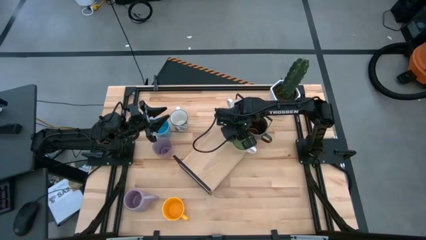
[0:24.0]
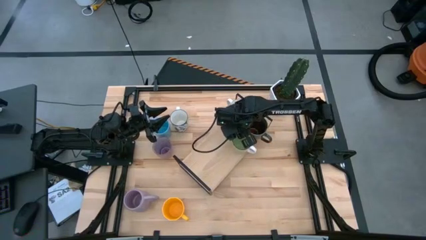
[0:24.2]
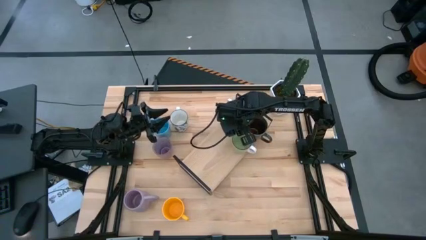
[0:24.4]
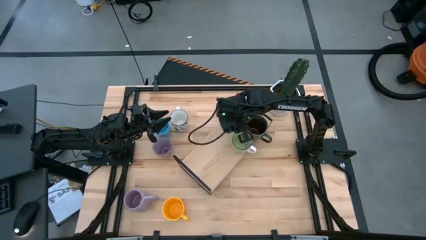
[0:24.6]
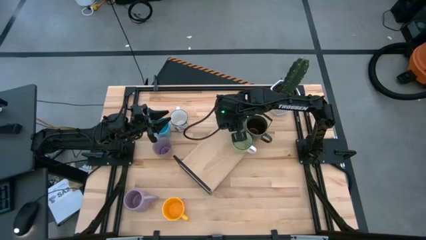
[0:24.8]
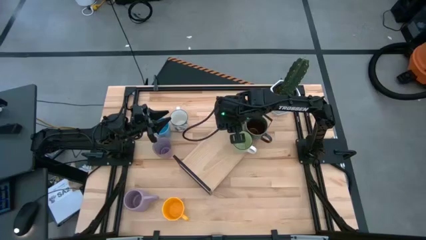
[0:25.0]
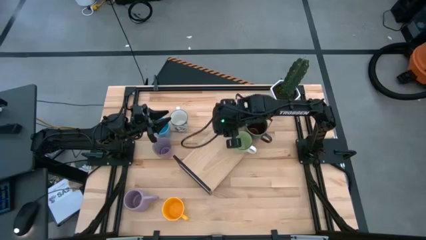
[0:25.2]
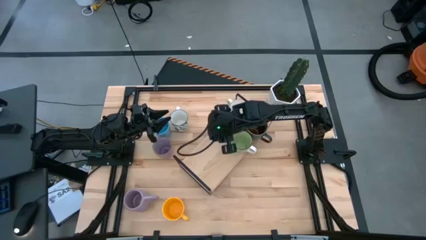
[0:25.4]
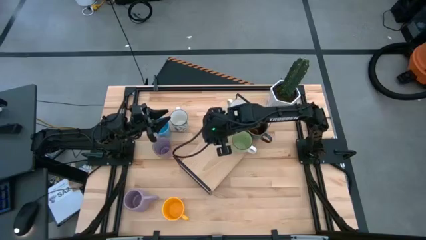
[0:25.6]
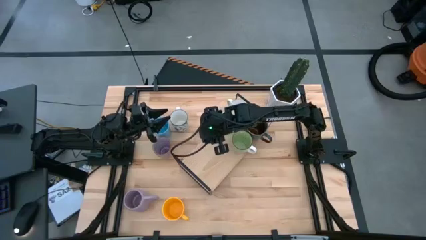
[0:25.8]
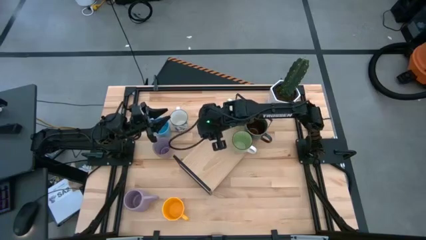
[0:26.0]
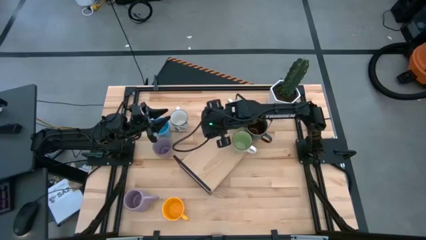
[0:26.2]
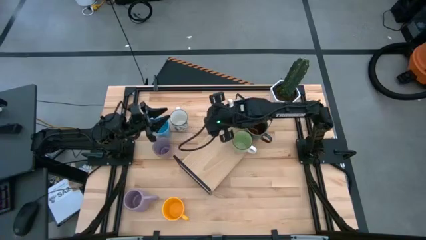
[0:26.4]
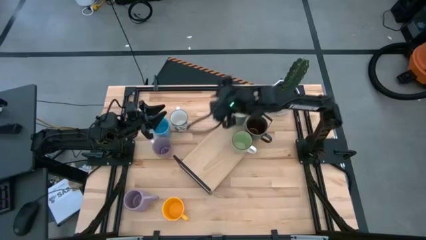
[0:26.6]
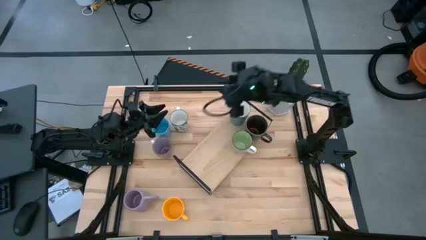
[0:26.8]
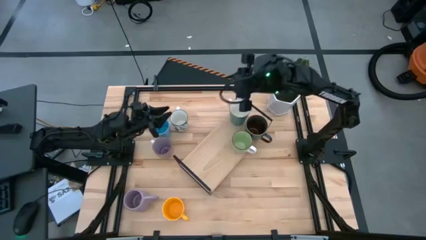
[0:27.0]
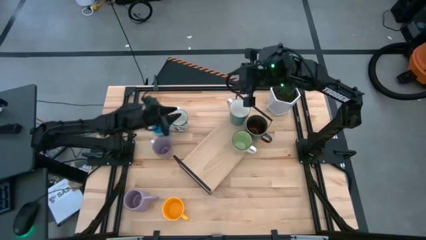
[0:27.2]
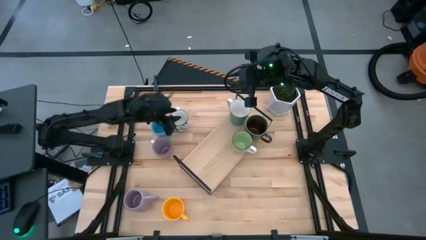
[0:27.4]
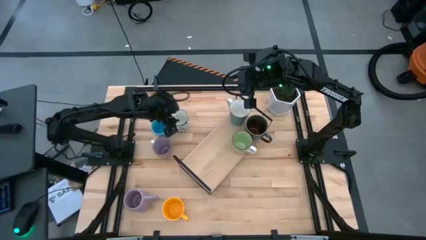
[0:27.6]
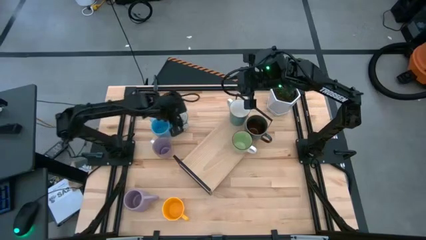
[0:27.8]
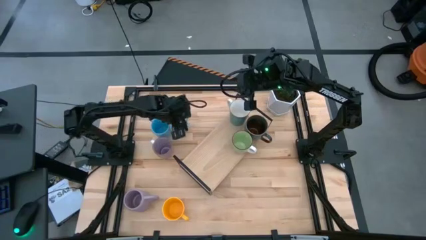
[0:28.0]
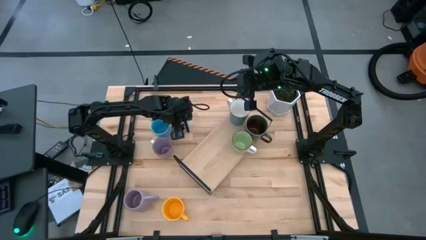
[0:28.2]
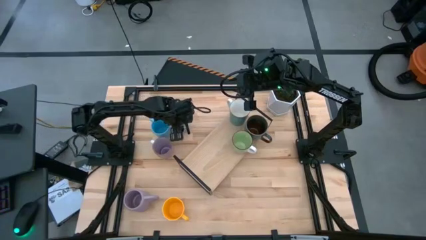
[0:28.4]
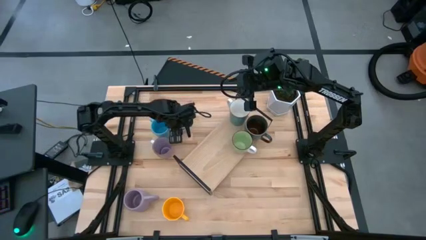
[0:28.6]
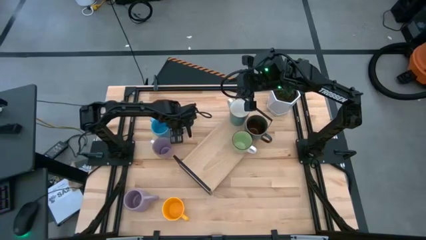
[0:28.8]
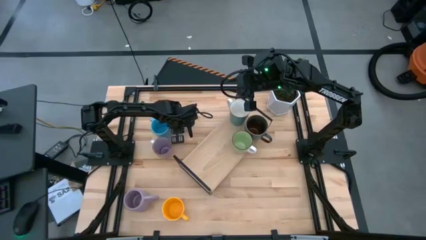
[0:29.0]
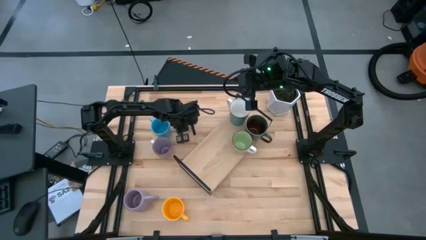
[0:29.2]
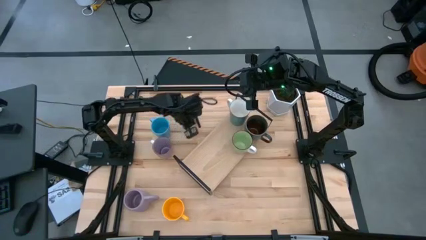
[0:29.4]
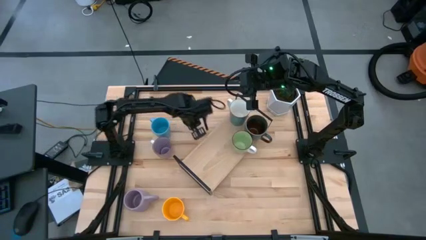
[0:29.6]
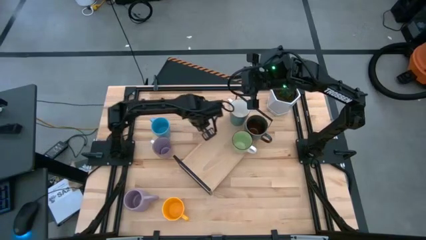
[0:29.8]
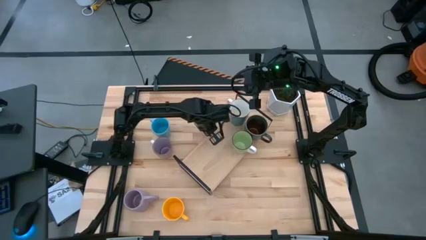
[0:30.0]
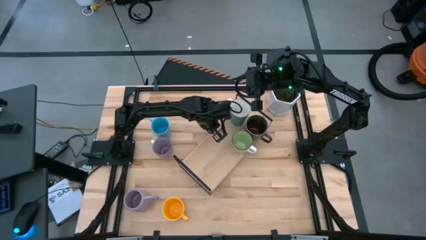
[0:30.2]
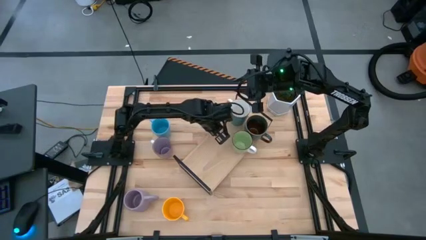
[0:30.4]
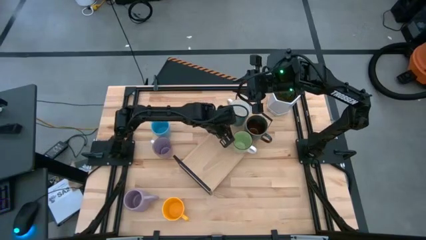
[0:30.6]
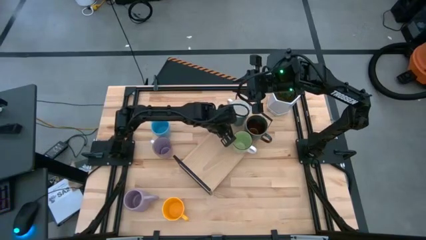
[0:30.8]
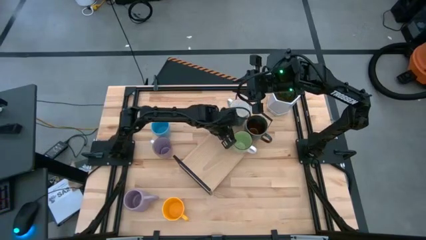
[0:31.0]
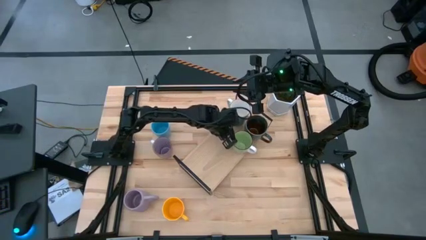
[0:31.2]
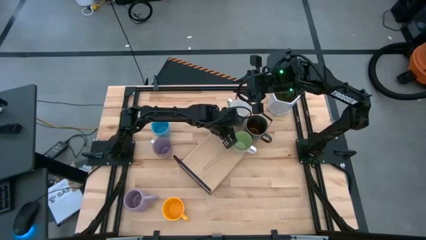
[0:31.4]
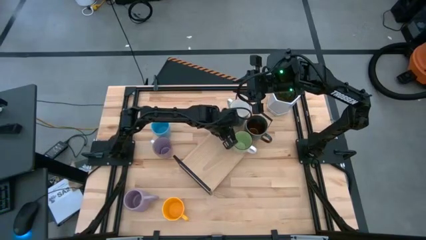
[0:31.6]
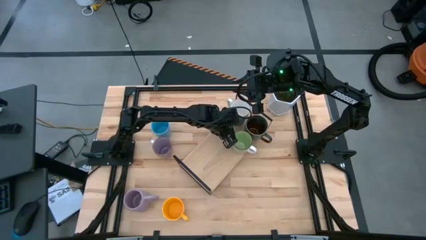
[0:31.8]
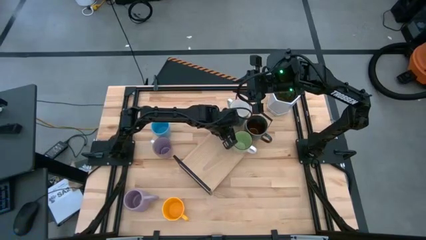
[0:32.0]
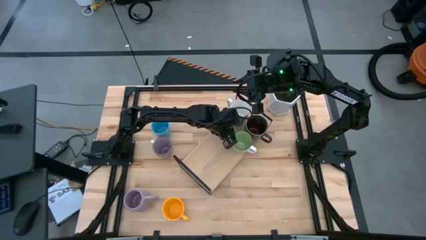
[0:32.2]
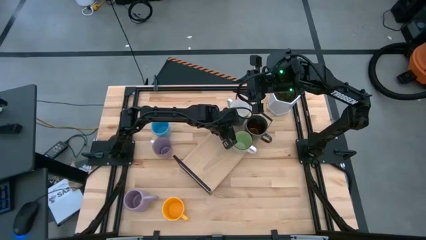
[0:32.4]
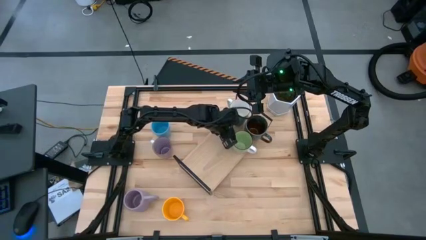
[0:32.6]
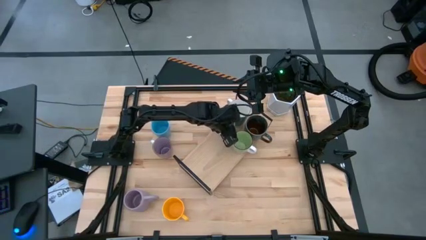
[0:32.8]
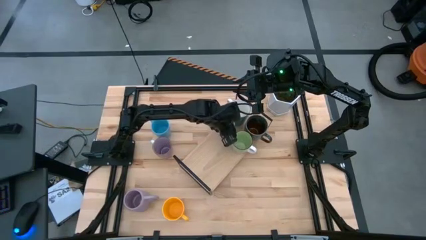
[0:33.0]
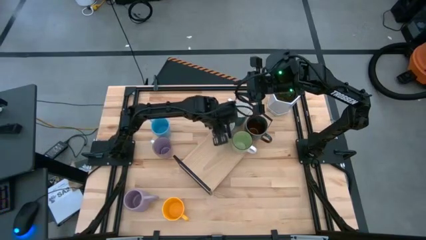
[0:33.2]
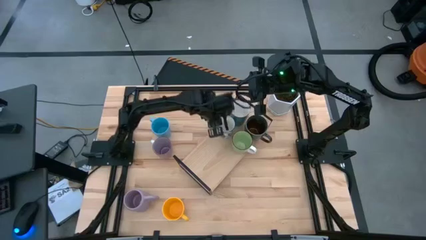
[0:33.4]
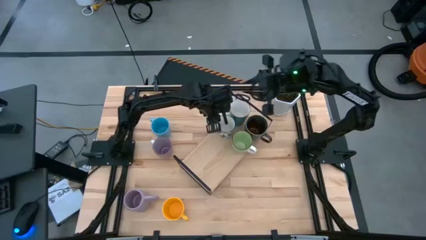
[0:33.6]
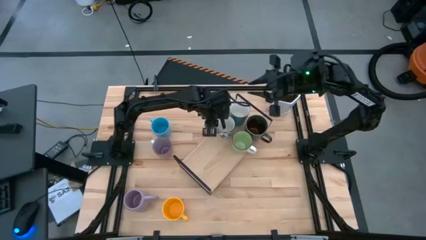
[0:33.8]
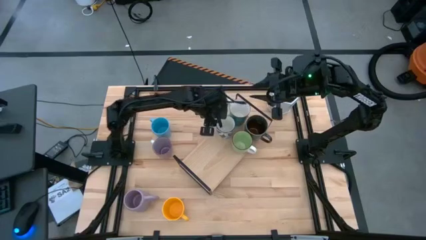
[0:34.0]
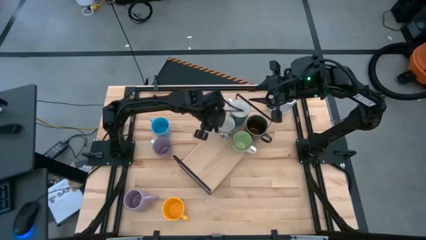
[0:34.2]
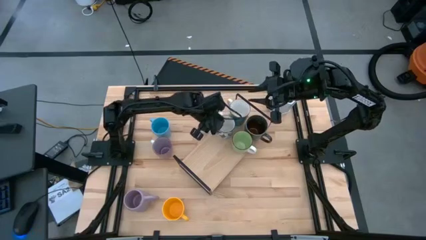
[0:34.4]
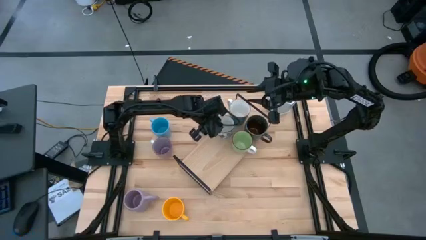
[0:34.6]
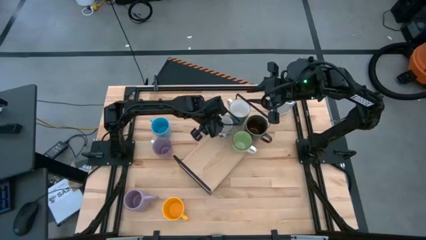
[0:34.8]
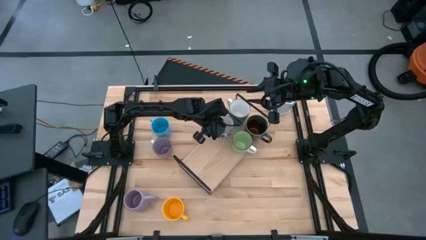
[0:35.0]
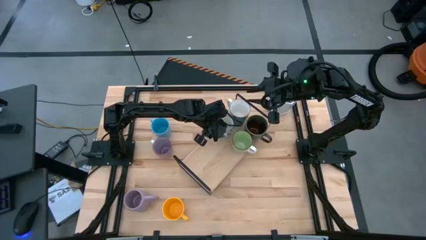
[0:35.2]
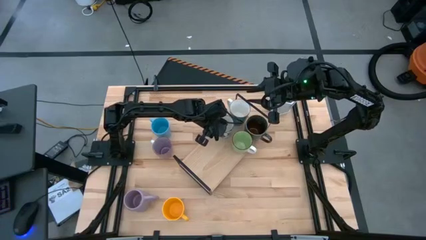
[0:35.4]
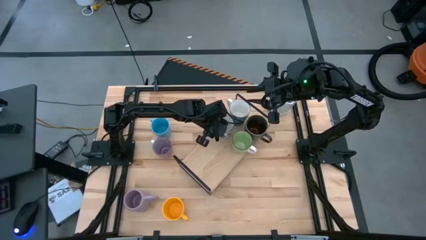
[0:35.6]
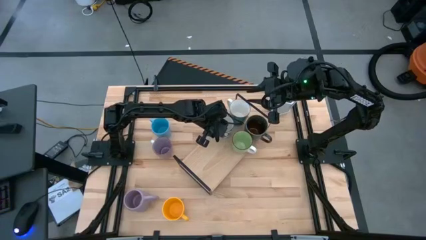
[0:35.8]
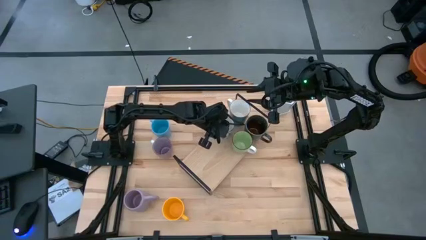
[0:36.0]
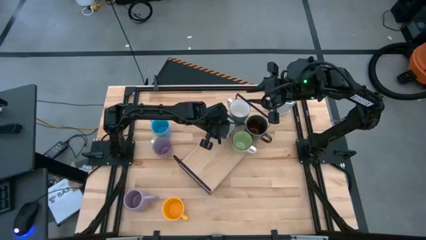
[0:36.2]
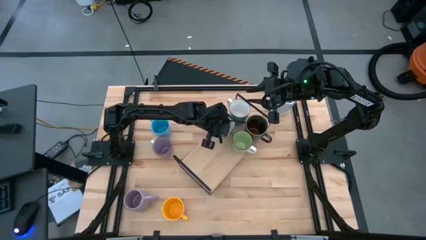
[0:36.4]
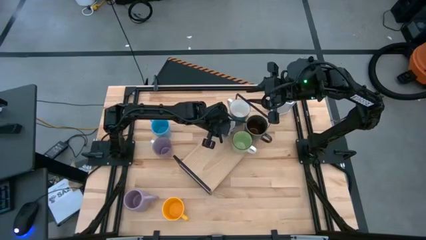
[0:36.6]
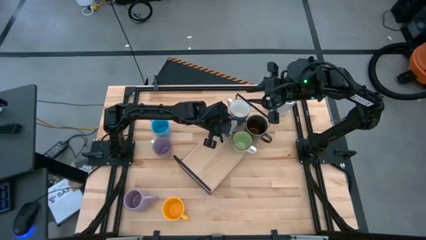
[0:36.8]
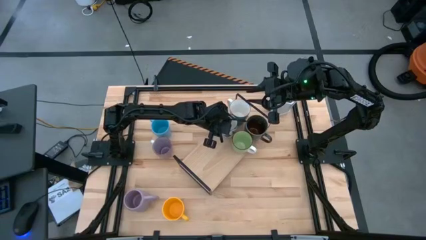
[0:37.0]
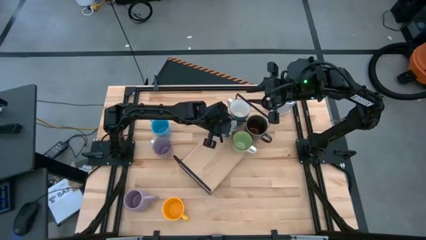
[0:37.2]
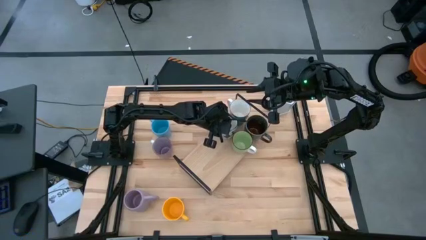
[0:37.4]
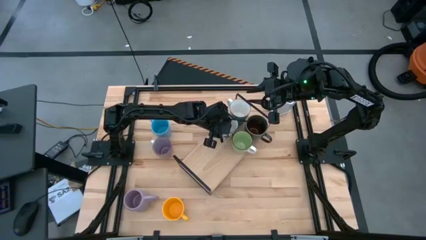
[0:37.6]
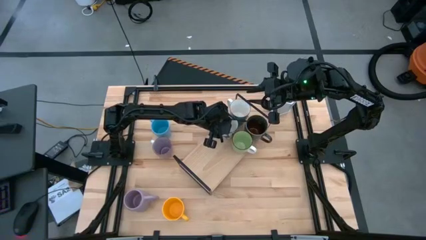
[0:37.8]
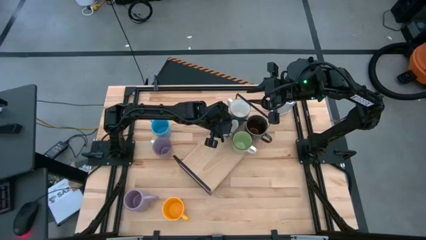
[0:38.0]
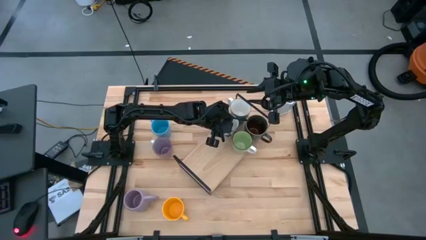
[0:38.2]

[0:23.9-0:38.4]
Task: Place coffee mugs
Put the white patterned mug on the shelf

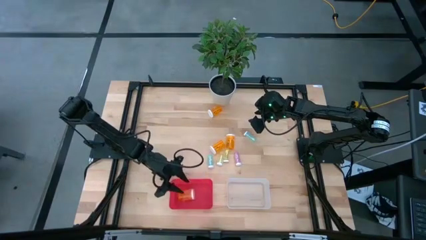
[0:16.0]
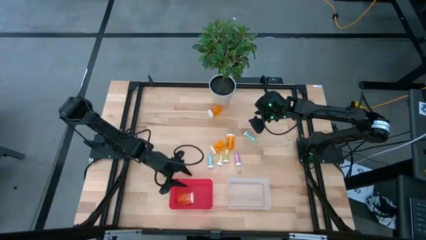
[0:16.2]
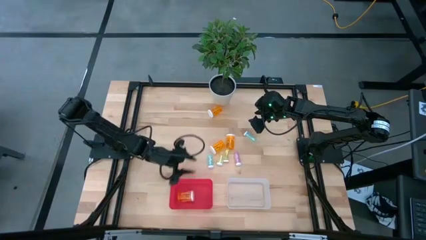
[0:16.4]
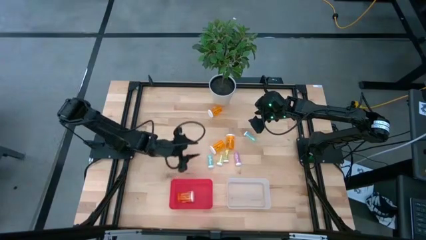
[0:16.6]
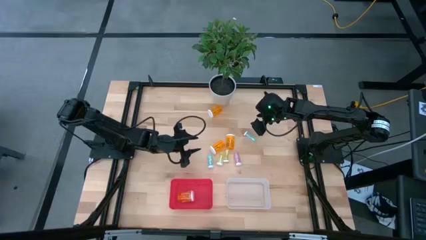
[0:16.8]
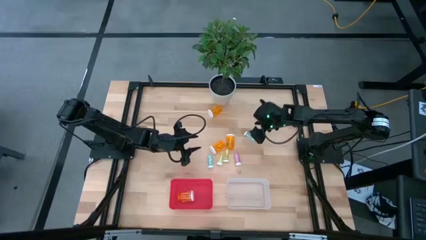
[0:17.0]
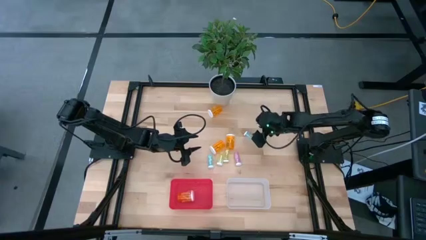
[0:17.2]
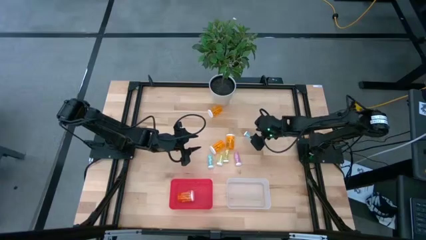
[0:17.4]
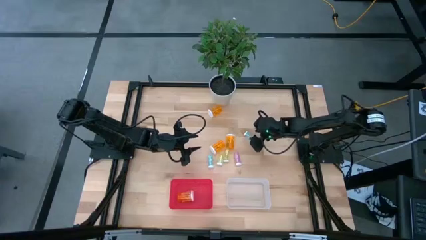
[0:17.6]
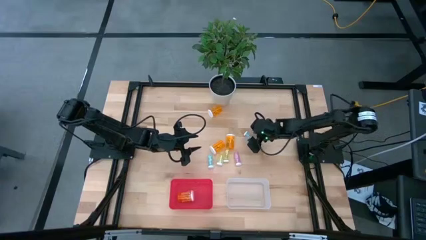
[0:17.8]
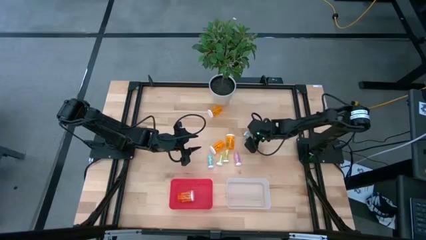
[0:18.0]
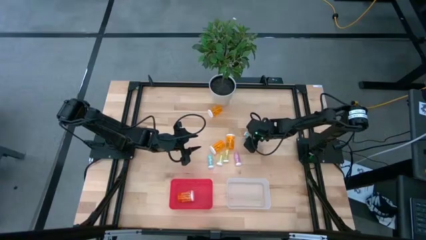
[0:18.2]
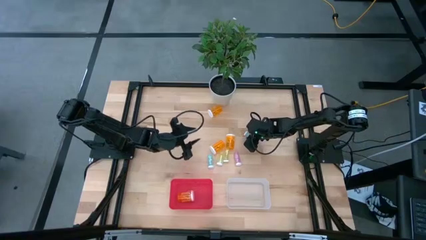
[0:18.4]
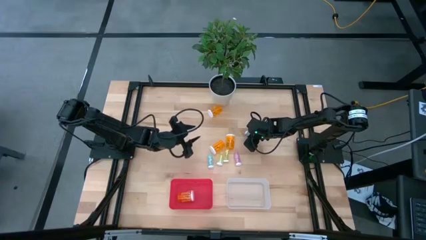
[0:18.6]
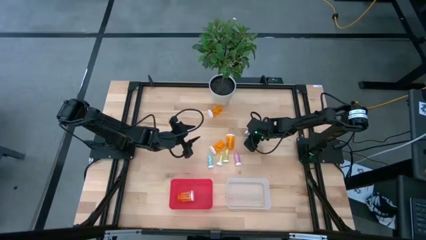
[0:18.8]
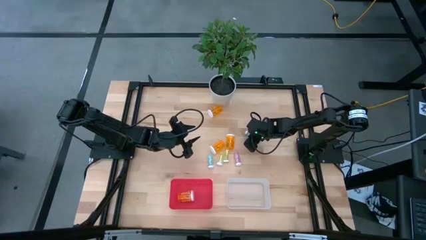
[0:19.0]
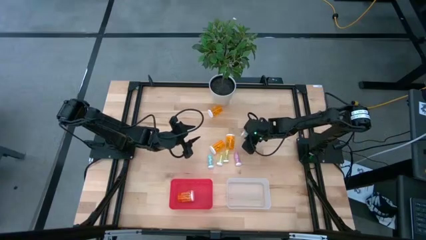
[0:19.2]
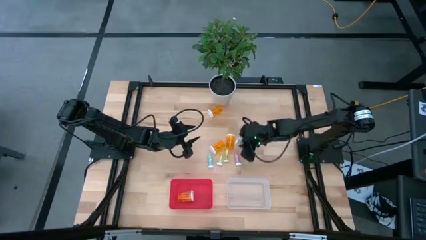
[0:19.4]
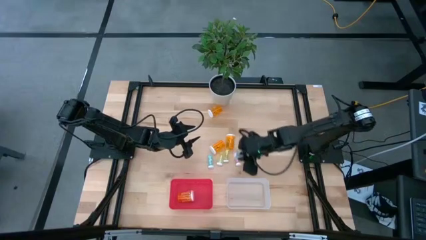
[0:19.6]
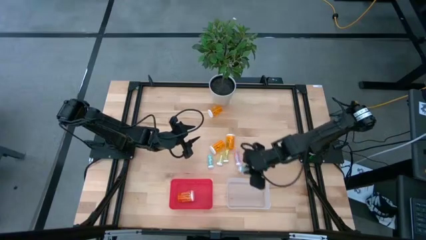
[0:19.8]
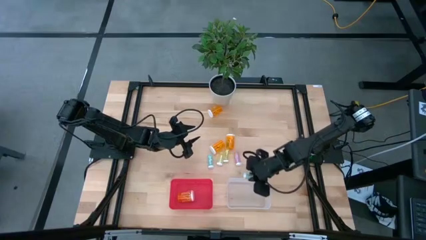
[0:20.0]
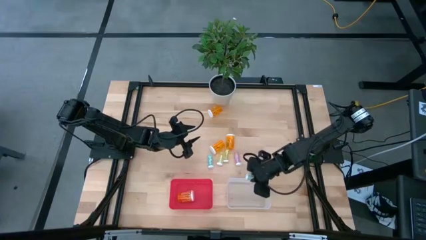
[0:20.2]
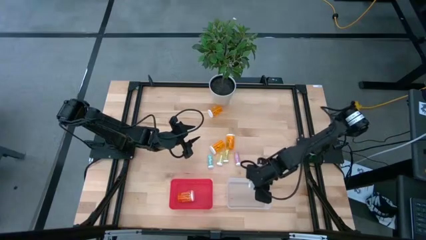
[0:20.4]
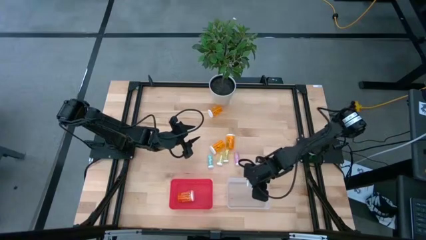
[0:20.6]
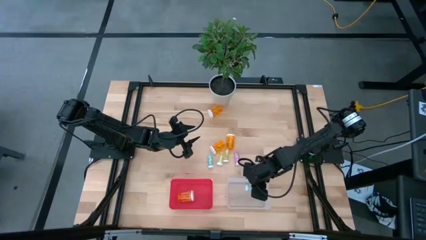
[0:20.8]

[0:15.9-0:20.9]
Task: Pick and place medicine bottles into bin by pill shape (circle, oval)
Put the top small blue pill bottle into the transparent bin
